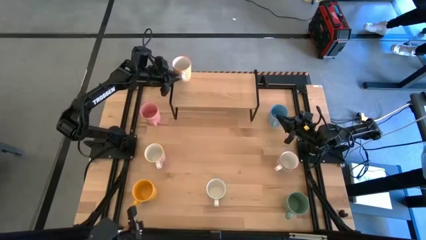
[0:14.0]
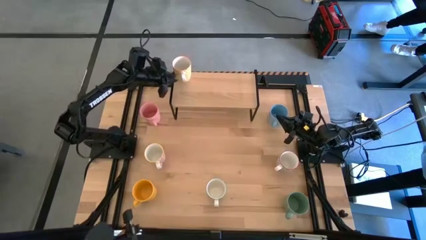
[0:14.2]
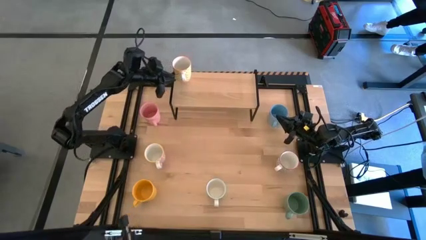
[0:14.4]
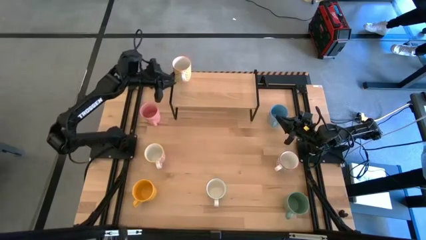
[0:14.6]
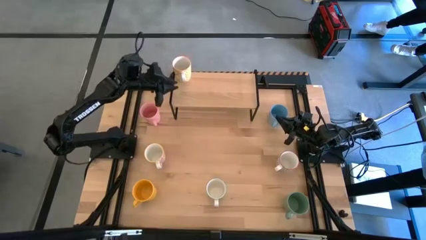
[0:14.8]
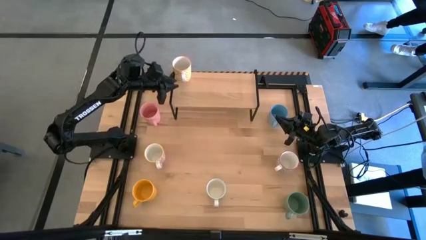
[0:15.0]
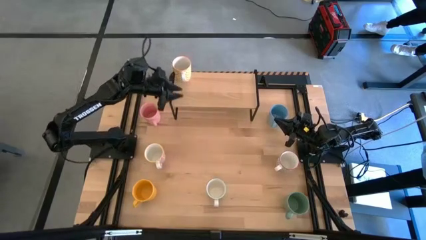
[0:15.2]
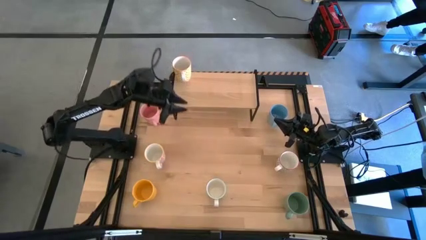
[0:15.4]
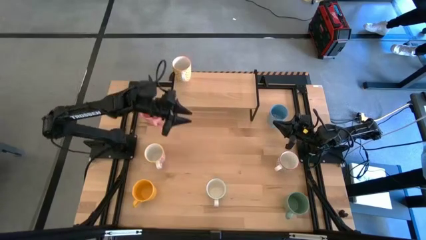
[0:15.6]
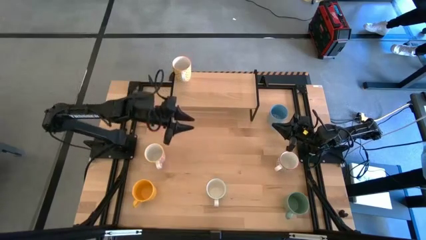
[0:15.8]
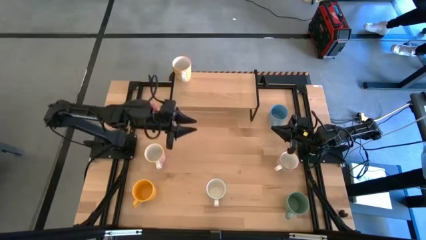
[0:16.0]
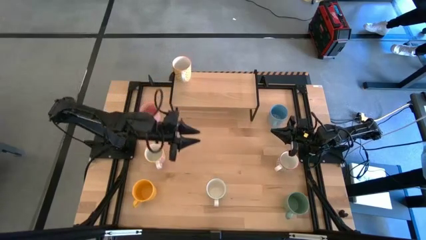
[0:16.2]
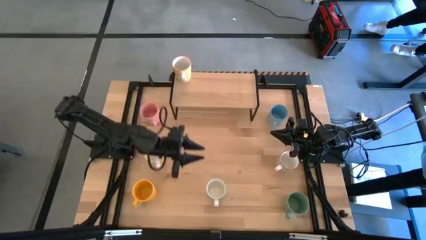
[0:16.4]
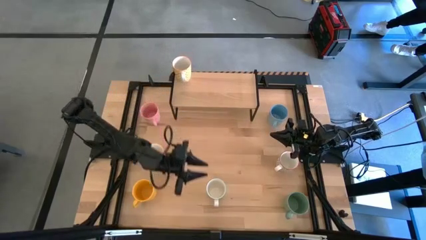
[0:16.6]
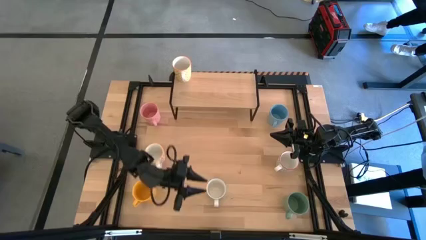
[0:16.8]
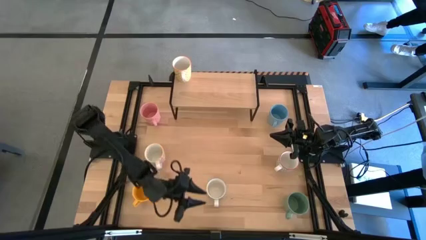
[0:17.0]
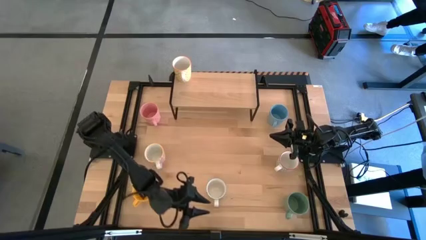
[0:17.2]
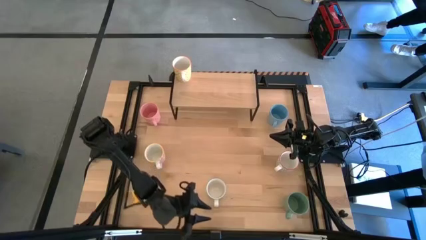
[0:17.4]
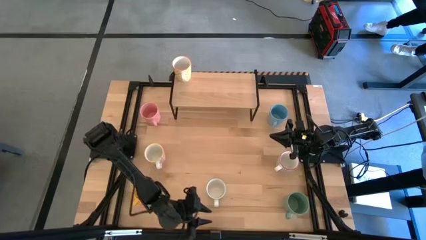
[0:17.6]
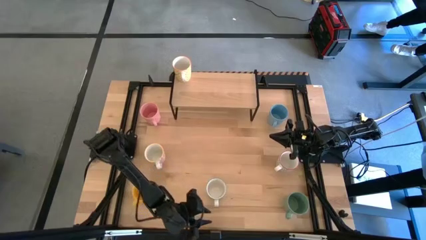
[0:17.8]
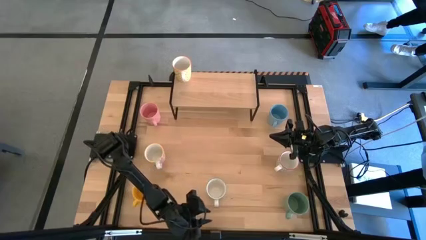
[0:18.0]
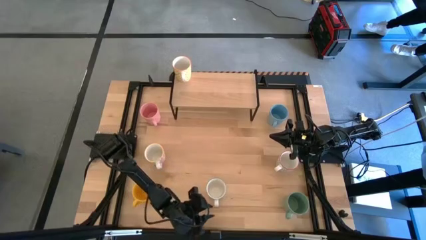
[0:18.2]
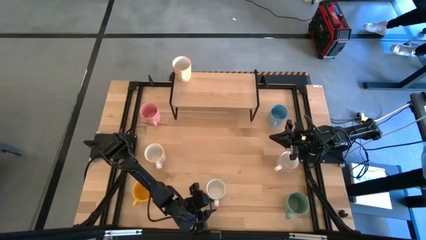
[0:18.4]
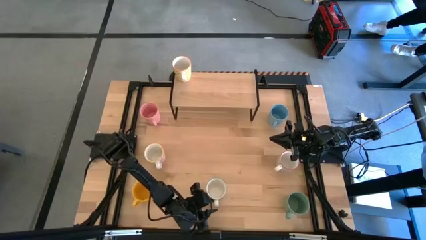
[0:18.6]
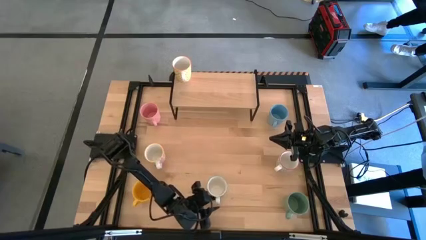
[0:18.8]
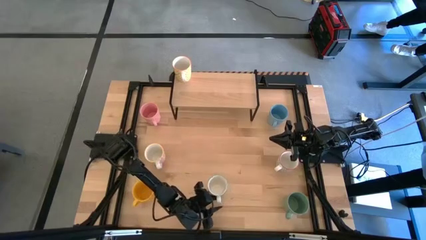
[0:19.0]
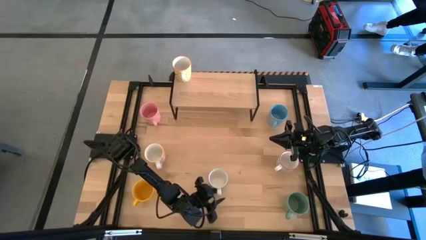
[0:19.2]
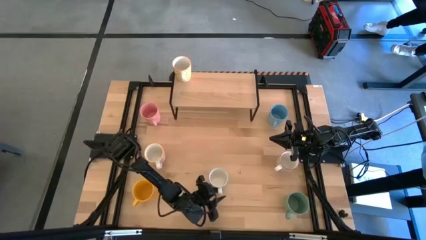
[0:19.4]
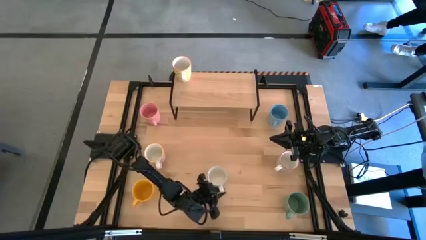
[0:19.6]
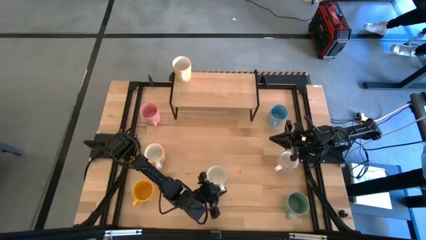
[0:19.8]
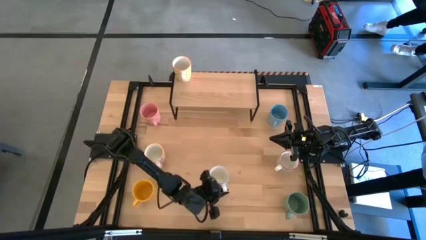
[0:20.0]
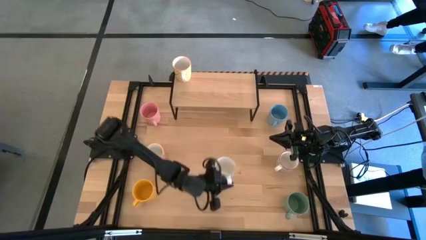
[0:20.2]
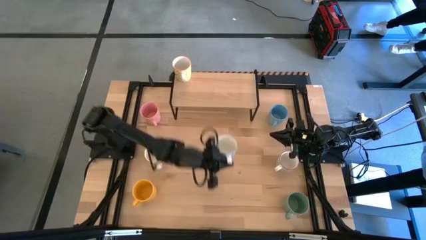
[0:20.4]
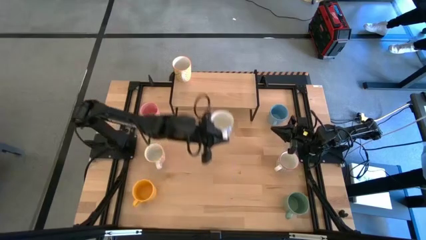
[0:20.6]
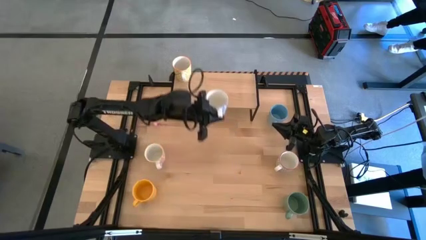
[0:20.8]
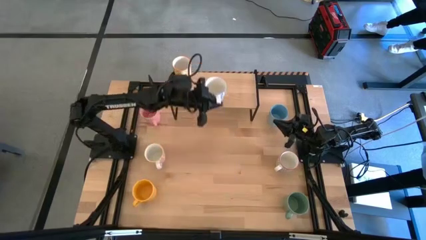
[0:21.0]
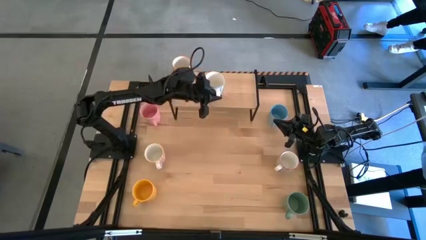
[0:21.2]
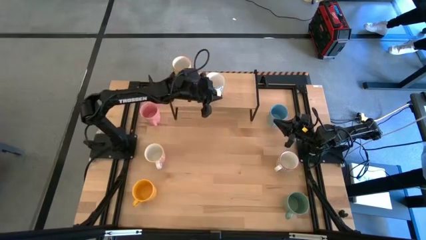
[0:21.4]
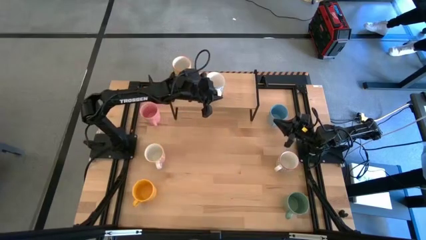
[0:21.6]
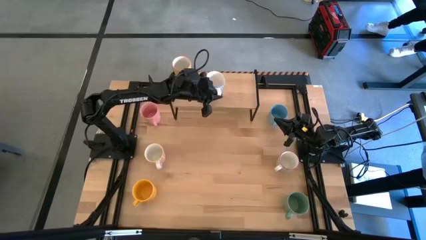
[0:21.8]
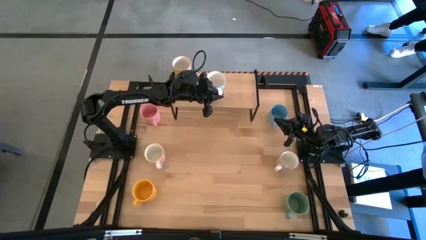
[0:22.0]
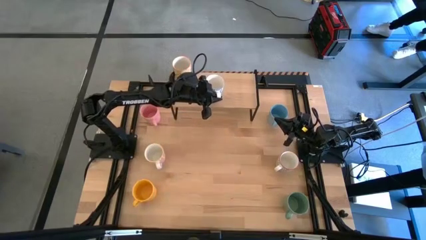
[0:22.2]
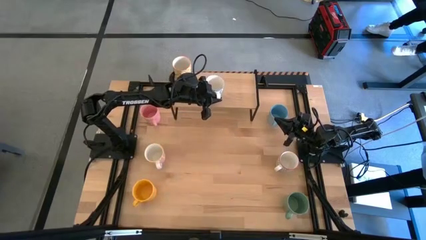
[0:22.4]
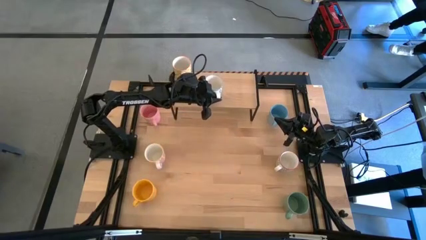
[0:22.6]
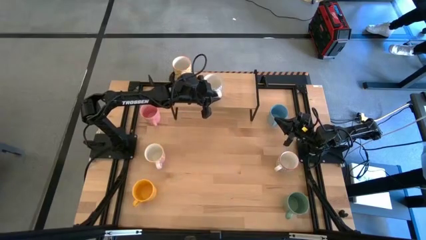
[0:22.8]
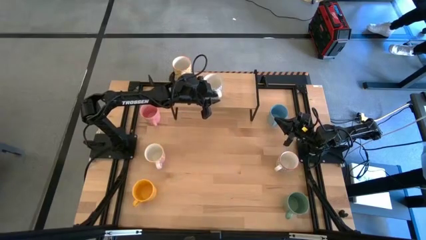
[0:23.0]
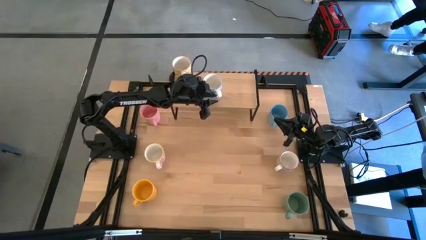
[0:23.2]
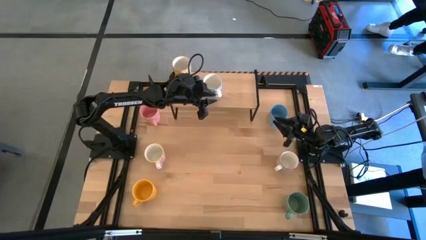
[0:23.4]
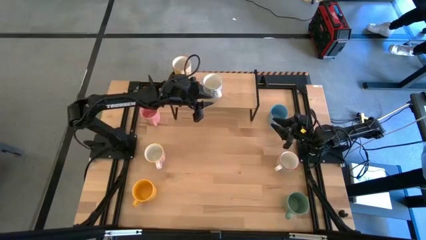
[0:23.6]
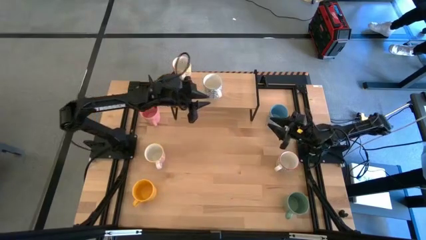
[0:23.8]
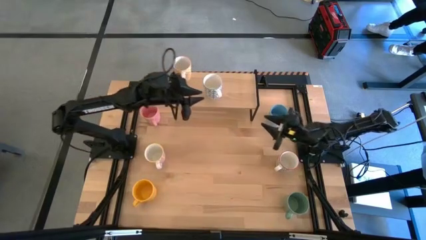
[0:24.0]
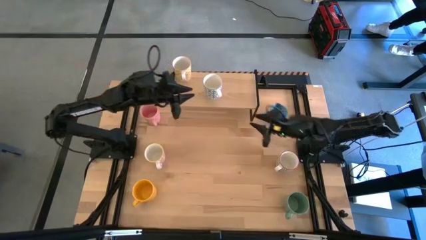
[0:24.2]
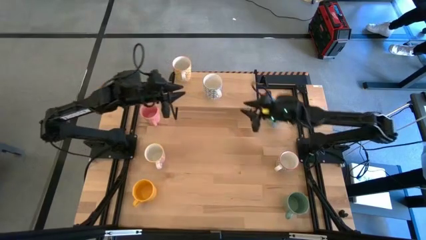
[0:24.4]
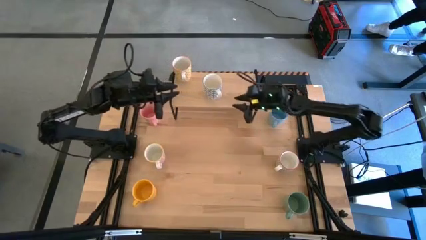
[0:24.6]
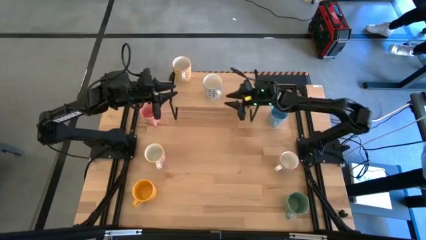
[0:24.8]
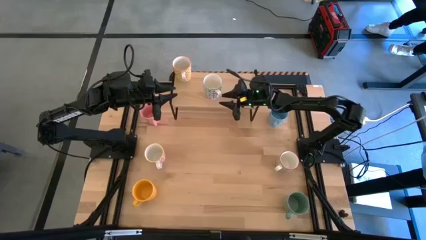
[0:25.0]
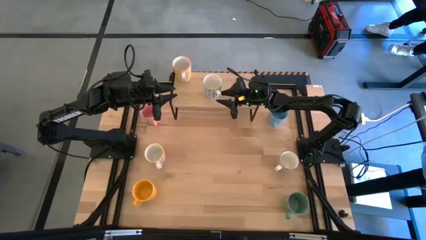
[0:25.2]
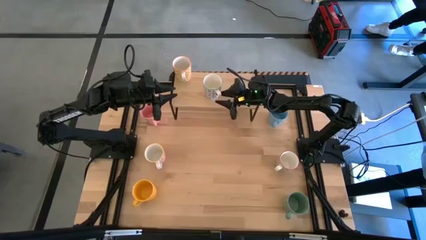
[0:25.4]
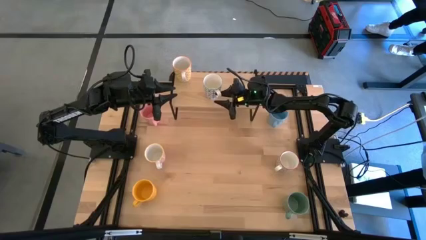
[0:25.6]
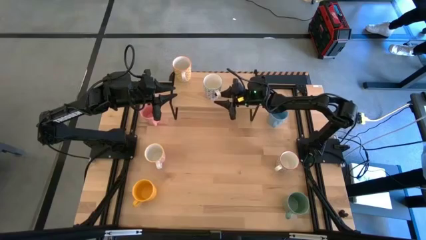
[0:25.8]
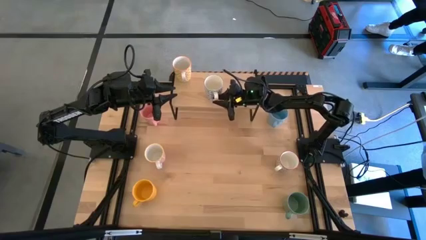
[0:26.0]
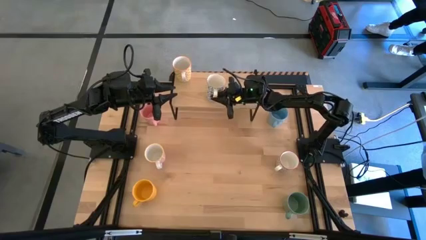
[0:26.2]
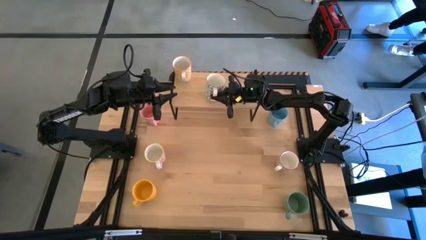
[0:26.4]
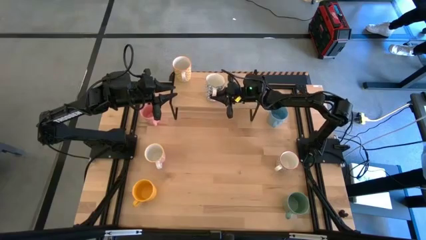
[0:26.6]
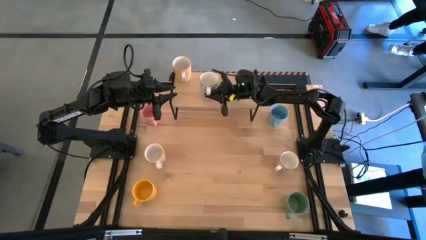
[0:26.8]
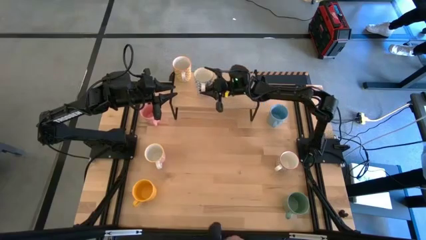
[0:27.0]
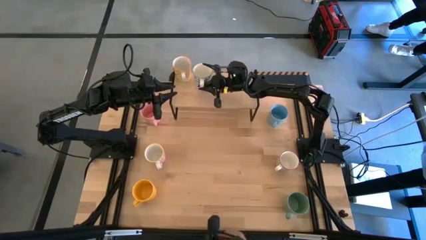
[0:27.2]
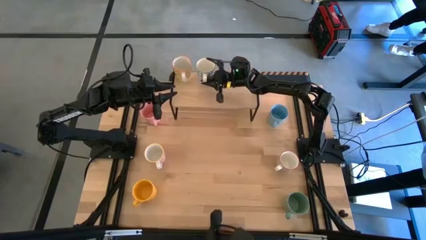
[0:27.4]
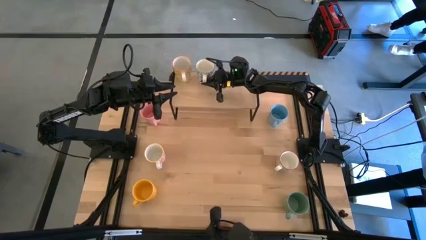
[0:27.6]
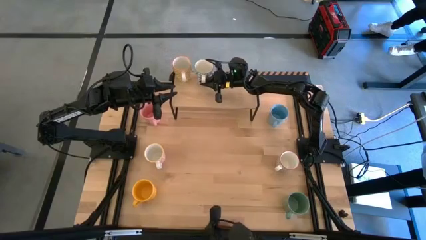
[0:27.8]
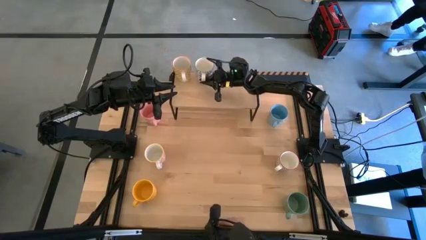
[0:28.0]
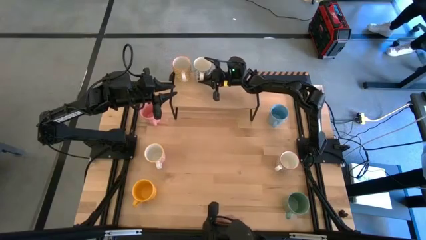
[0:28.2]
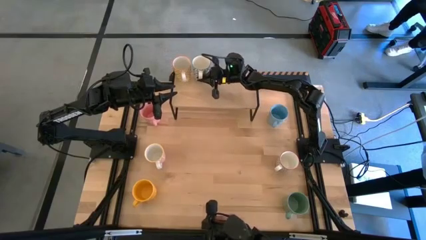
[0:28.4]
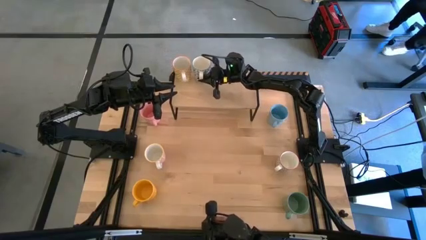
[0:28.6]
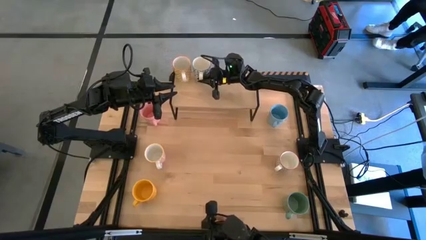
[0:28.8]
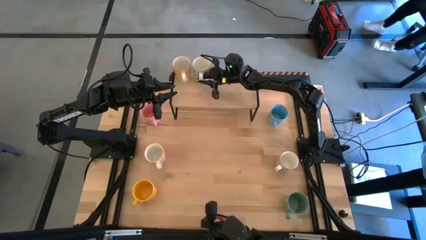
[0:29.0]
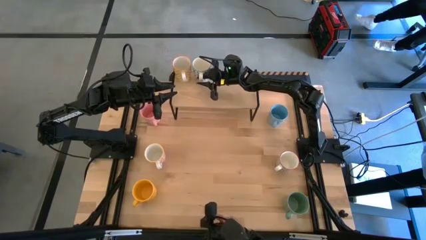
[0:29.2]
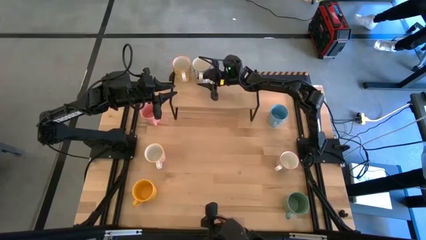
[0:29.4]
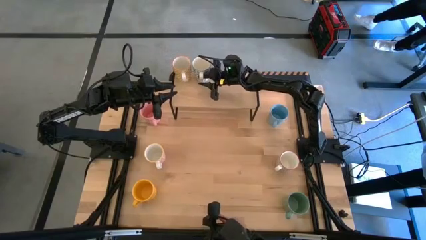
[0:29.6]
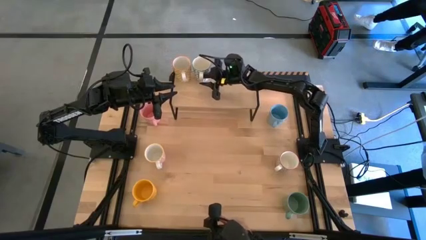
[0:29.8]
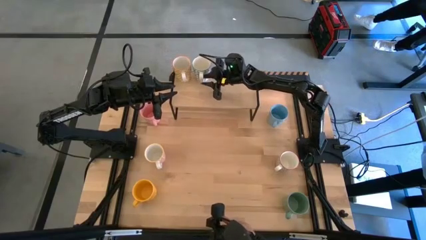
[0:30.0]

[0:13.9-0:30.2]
Task: Place coffee mugs
Put the blue pattern mug on the shelf
